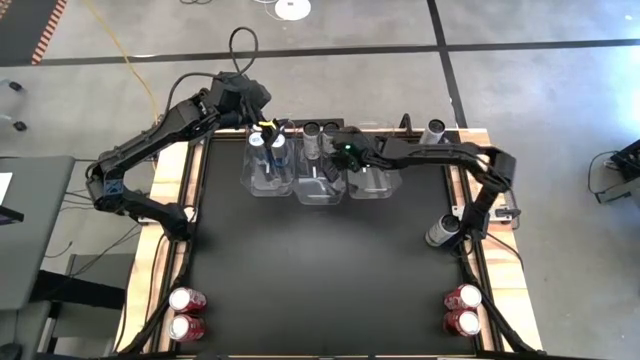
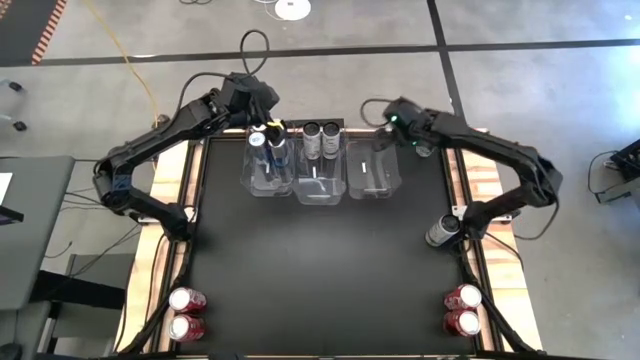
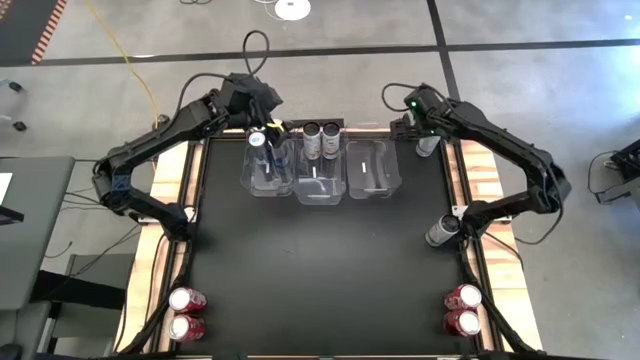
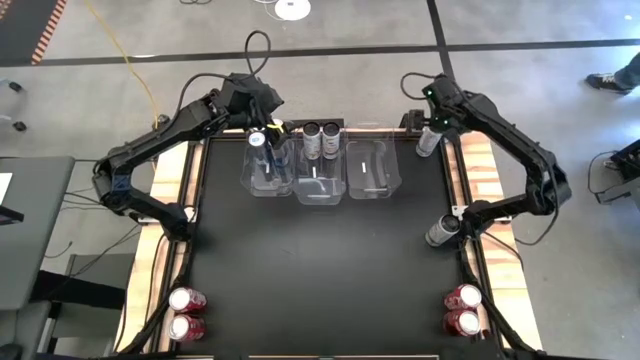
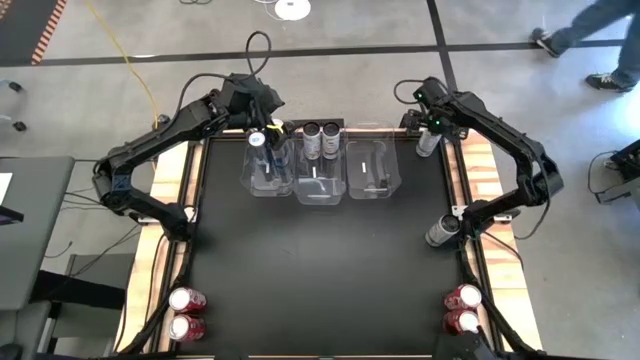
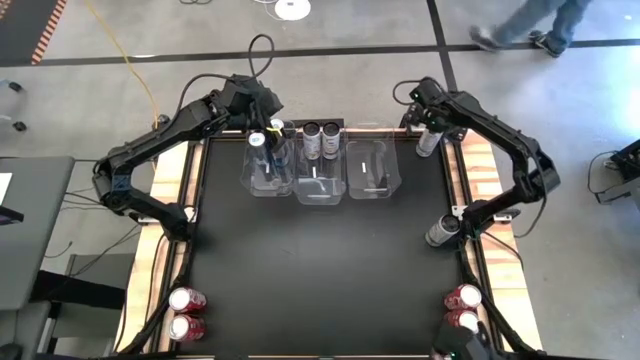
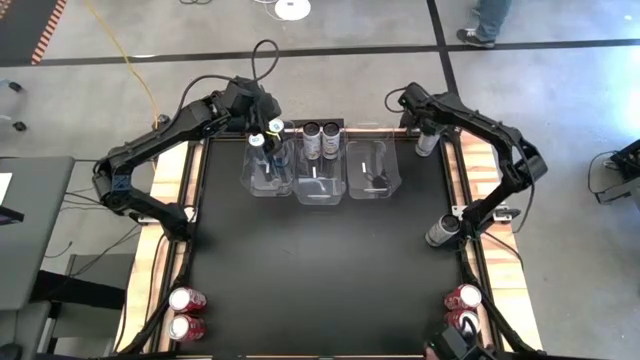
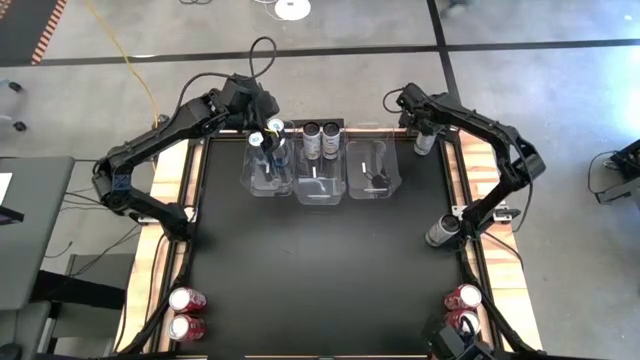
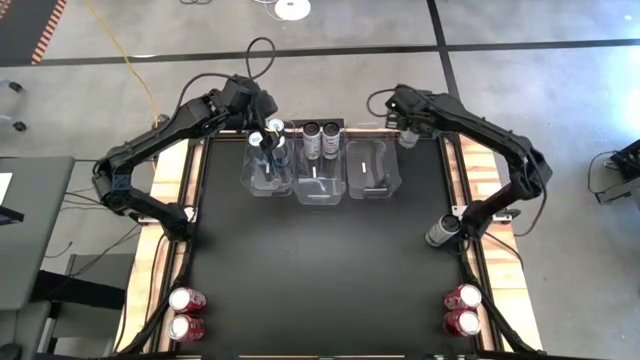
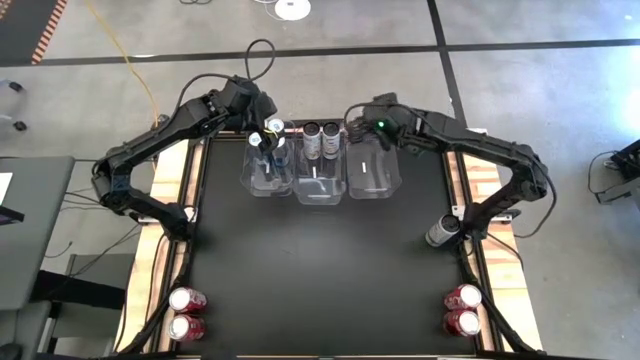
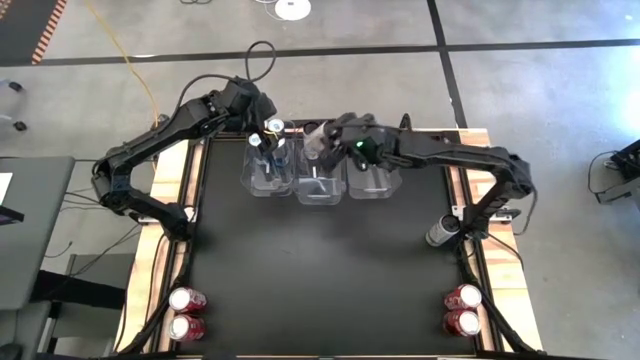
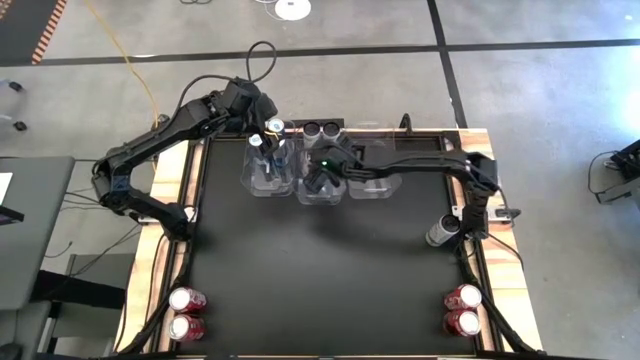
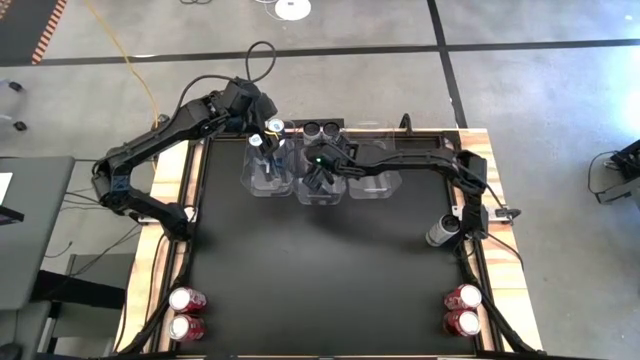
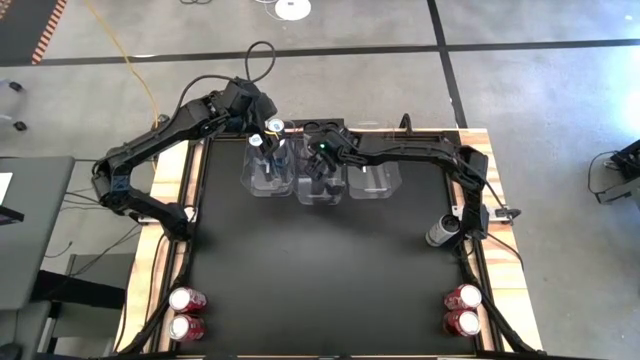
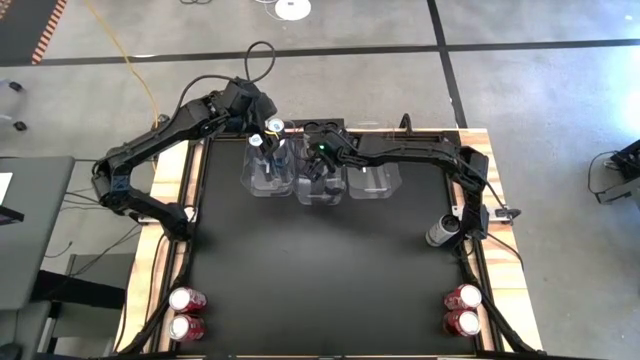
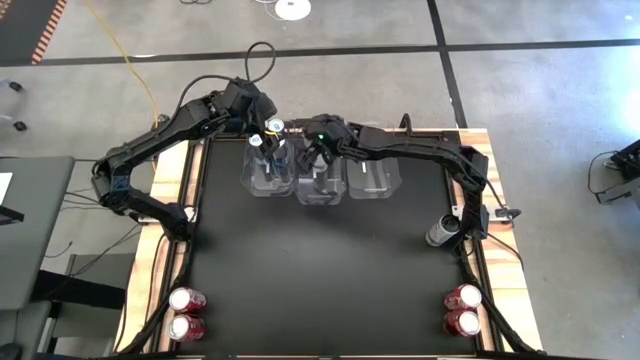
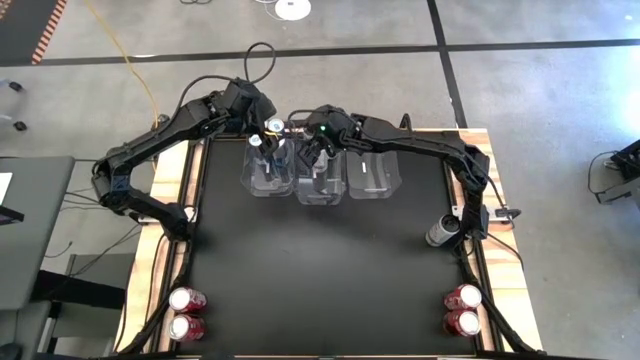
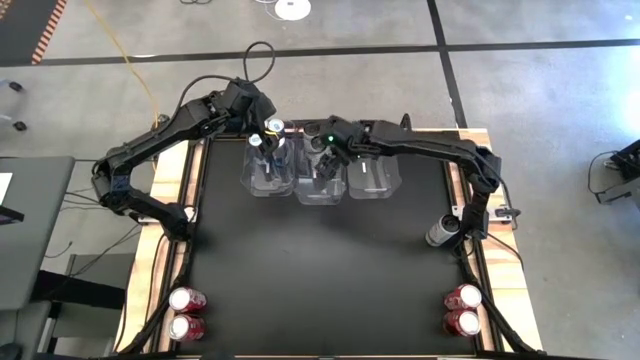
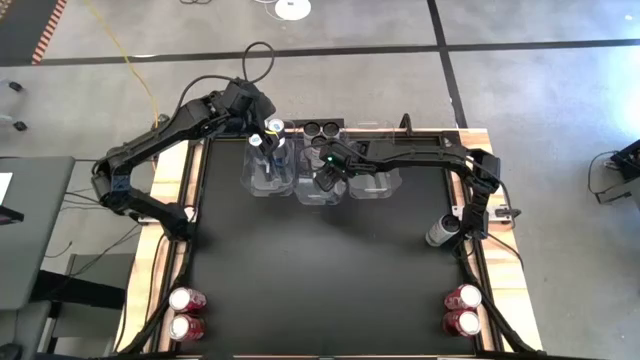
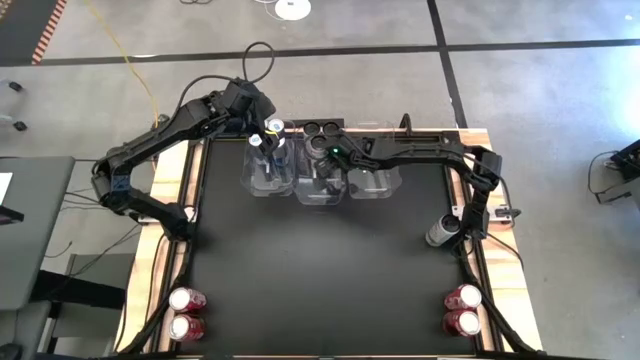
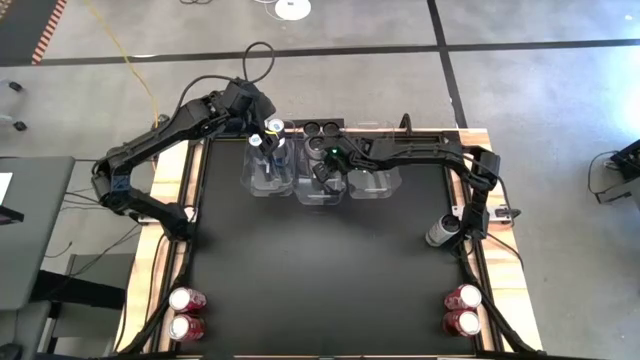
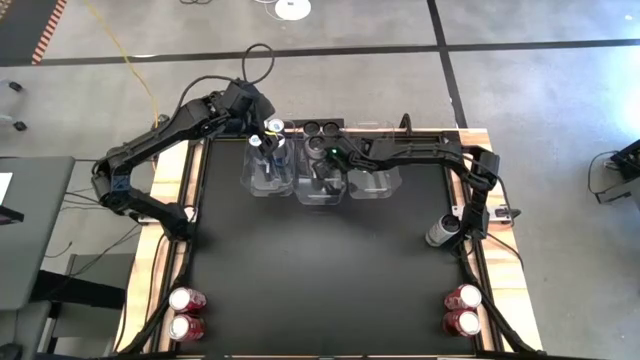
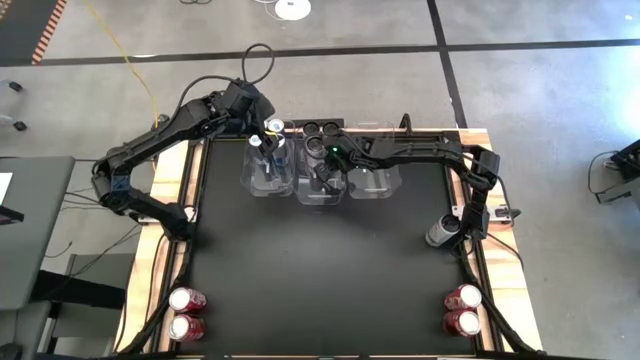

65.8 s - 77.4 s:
Task: Sort soda cans
Put the top white-yellow soda can into the center transparent bin

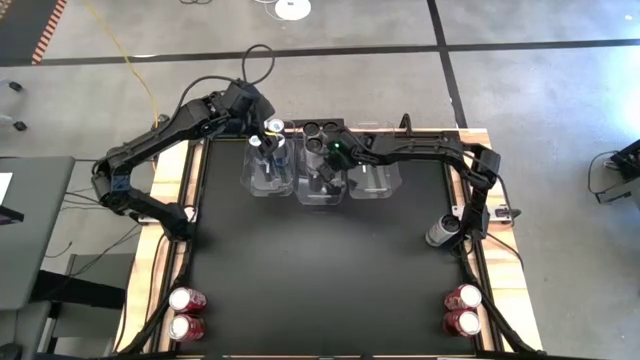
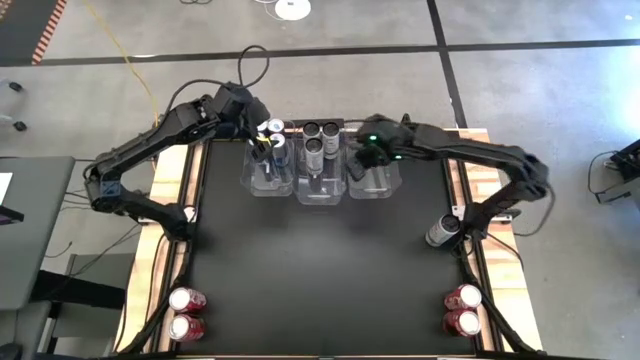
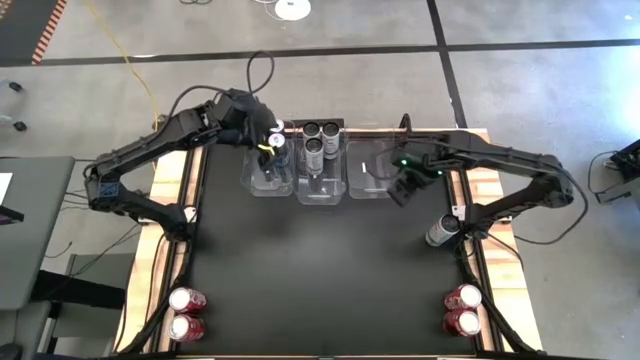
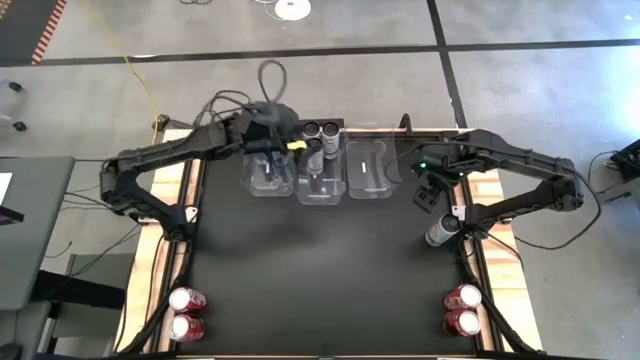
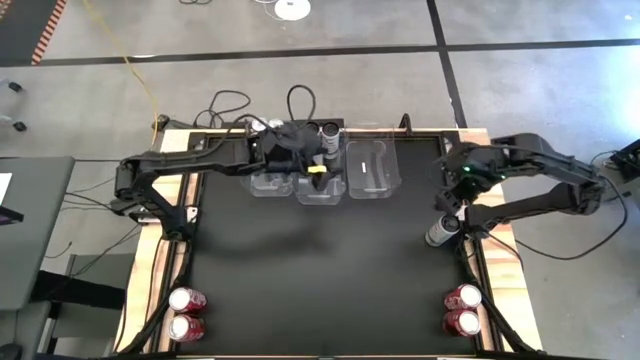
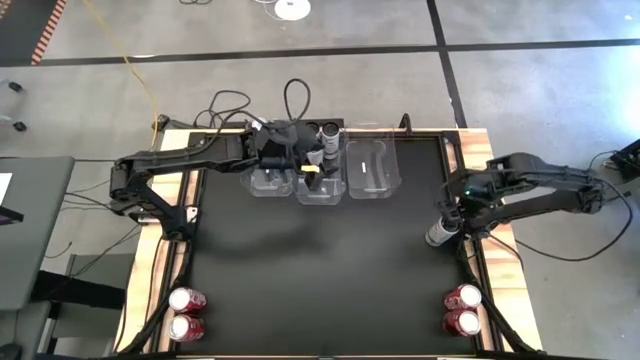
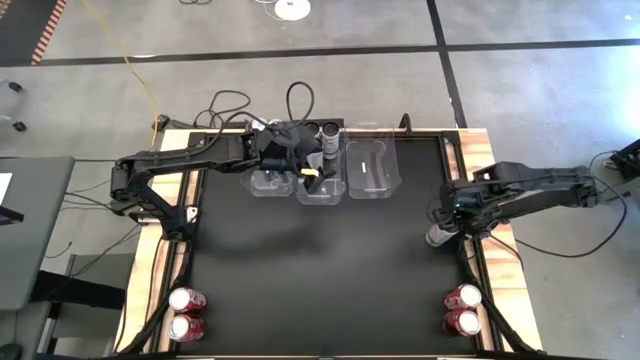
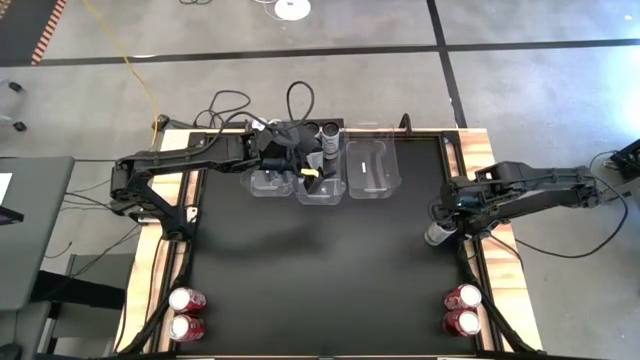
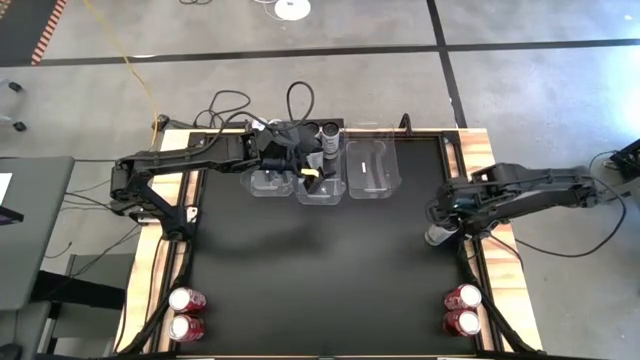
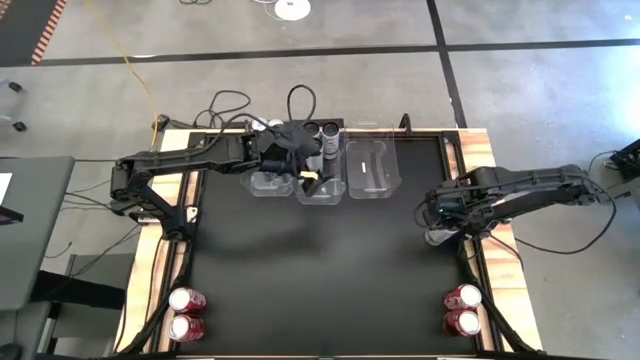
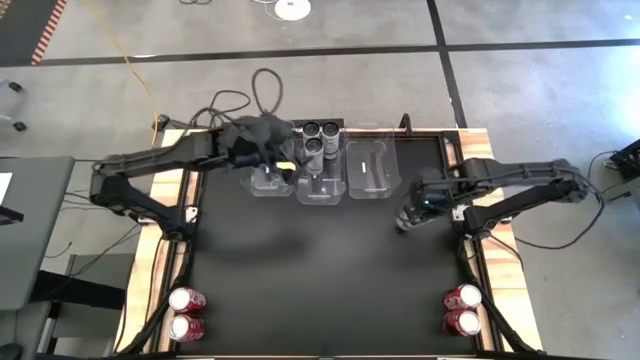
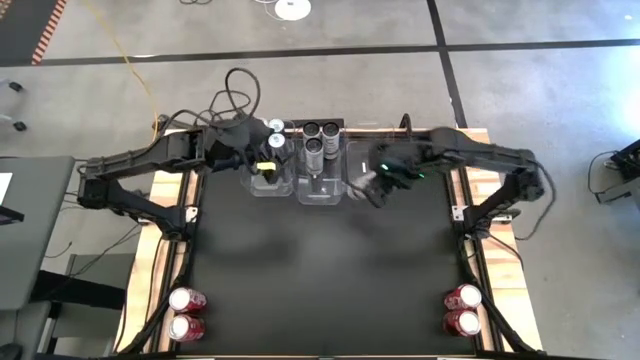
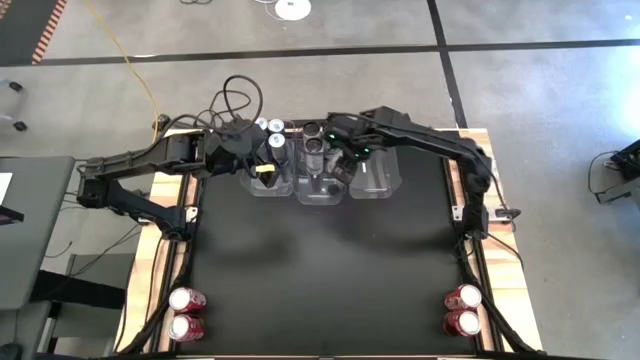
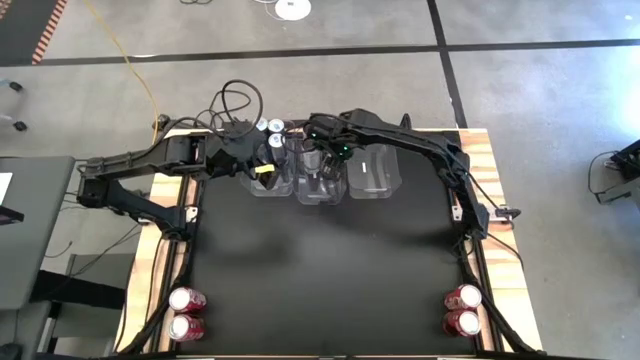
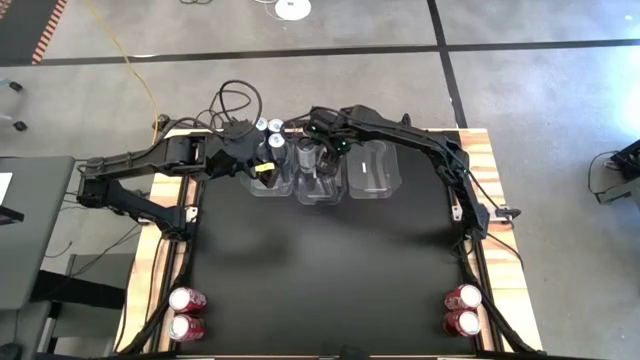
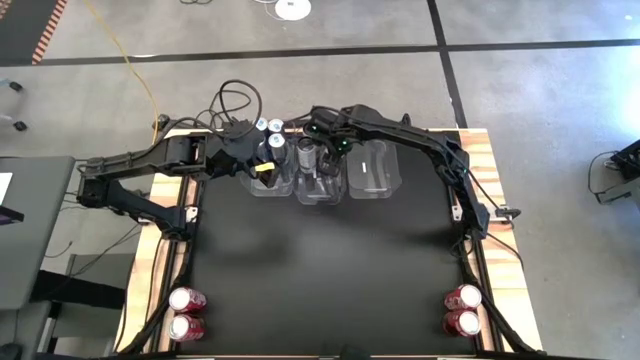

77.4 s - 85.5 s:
Put the white-yellow soda can into the center transparent bin

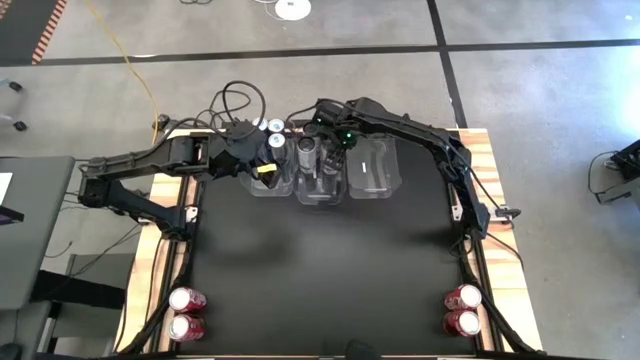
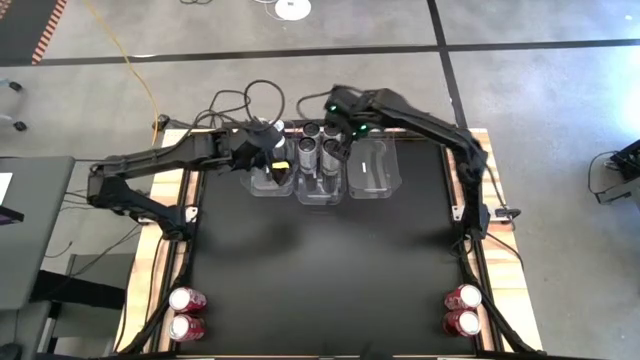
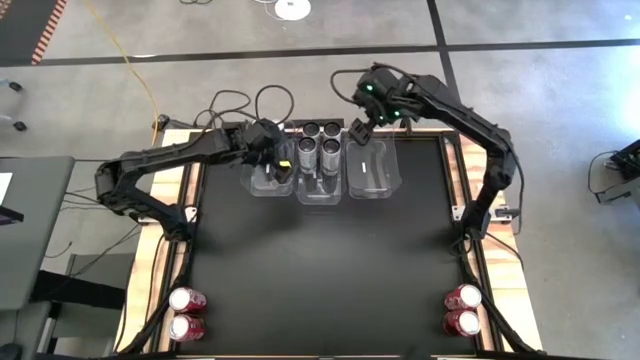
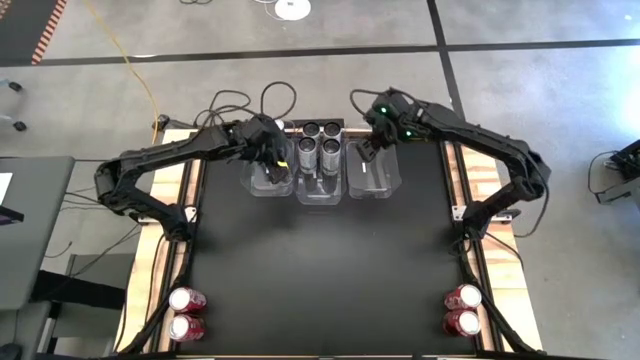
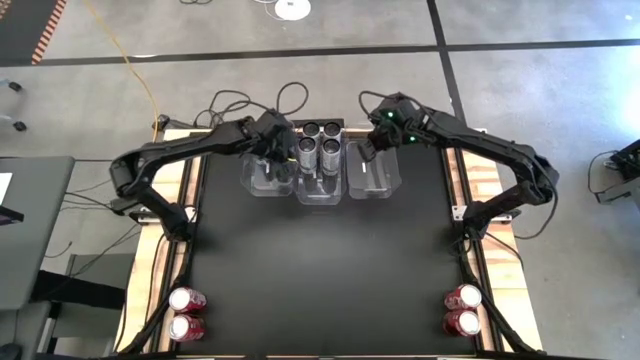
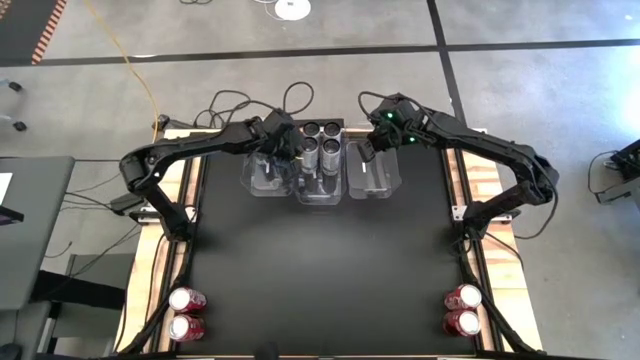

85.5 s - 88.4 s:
Adjust the white-yellow soda can on the center transparent bin
